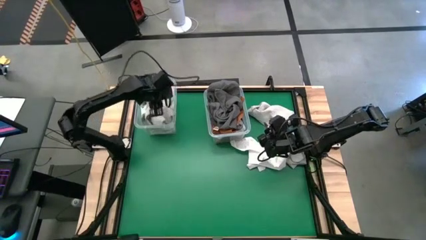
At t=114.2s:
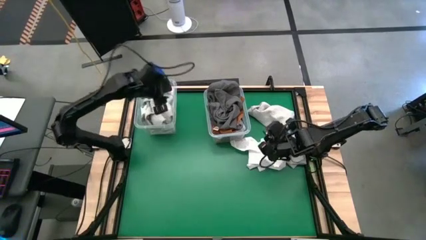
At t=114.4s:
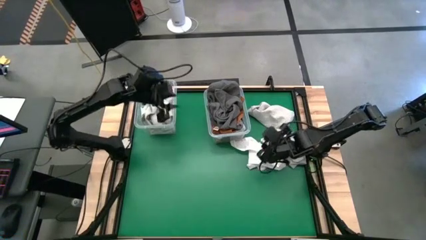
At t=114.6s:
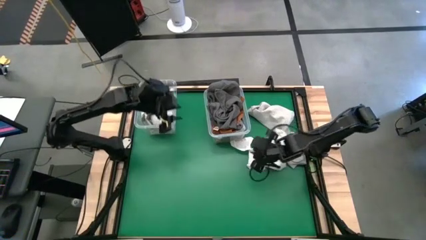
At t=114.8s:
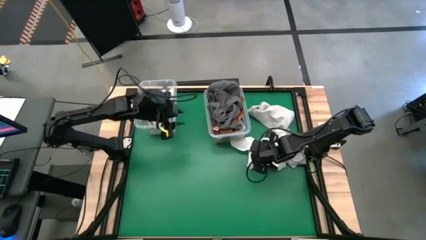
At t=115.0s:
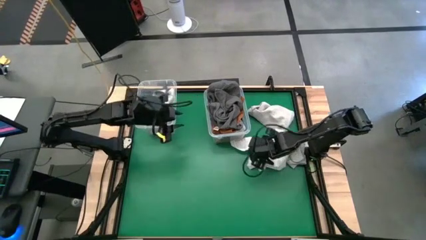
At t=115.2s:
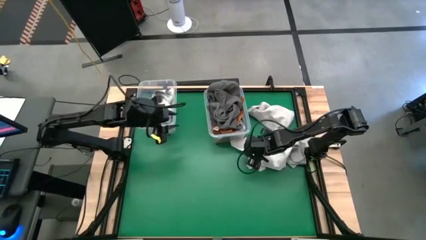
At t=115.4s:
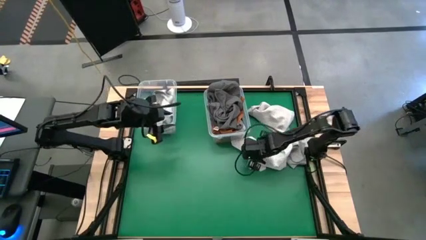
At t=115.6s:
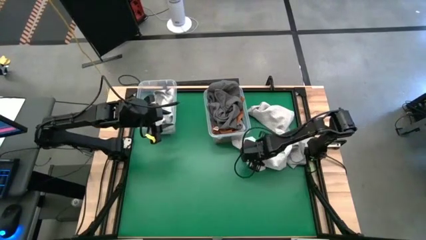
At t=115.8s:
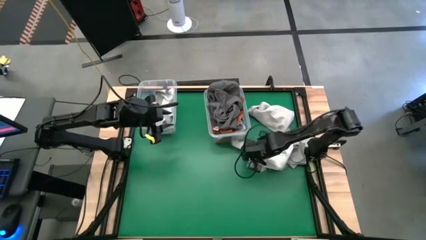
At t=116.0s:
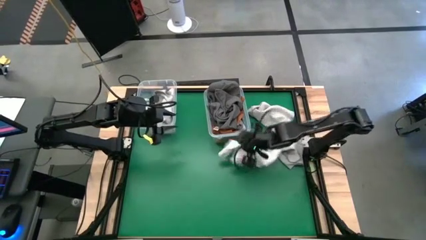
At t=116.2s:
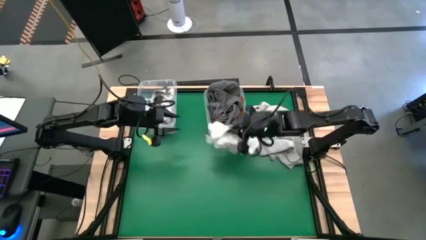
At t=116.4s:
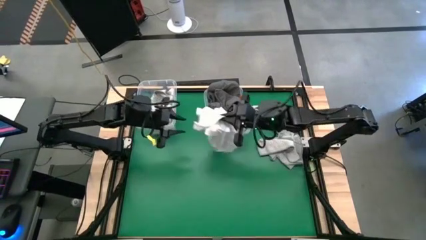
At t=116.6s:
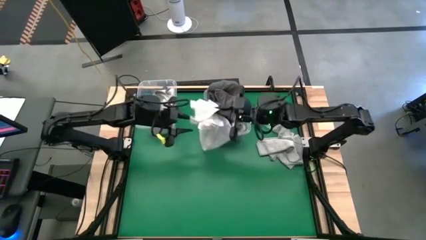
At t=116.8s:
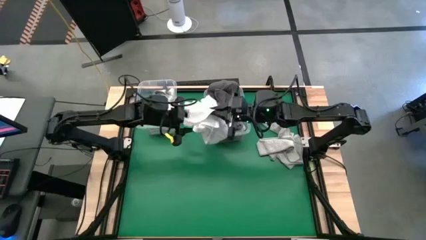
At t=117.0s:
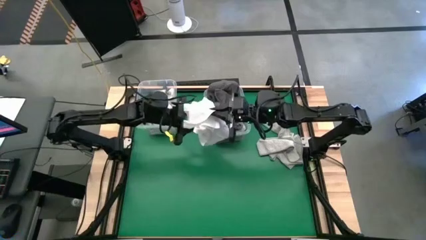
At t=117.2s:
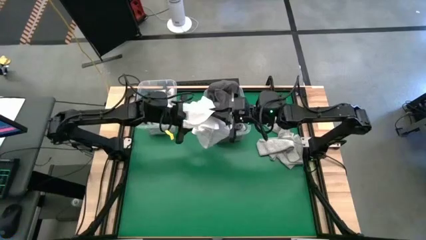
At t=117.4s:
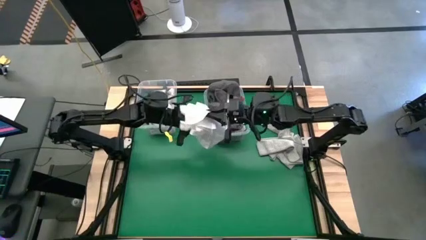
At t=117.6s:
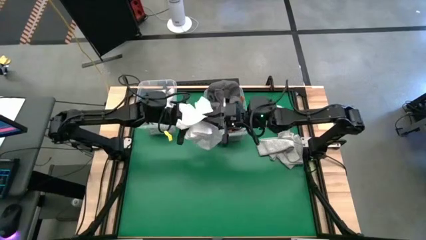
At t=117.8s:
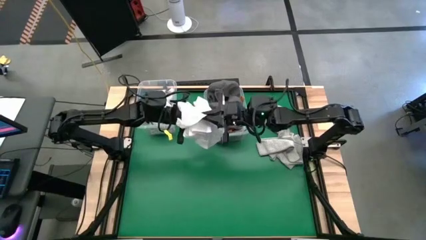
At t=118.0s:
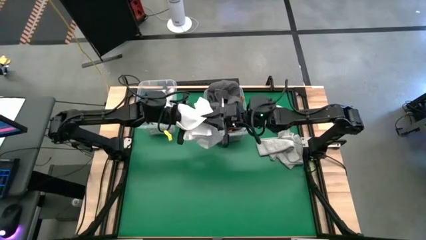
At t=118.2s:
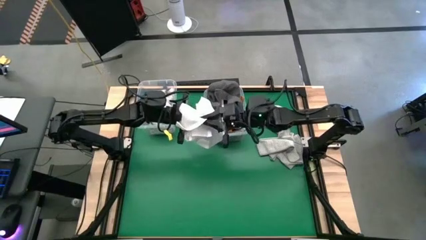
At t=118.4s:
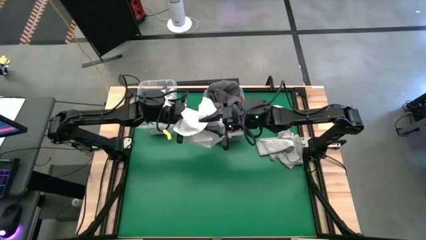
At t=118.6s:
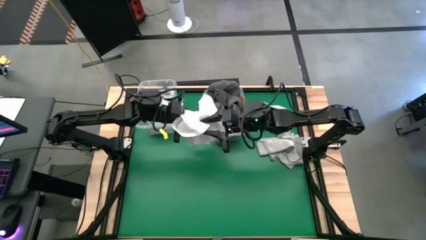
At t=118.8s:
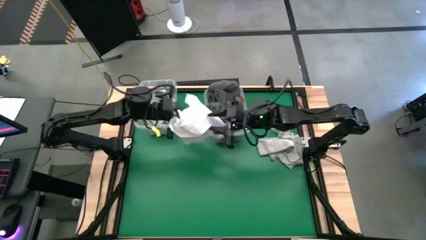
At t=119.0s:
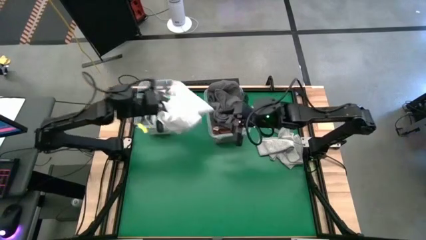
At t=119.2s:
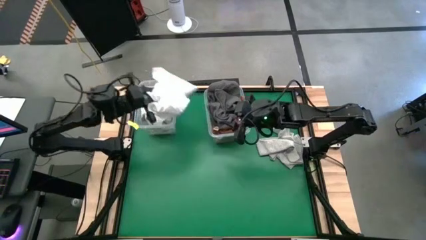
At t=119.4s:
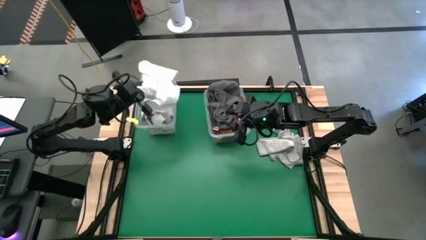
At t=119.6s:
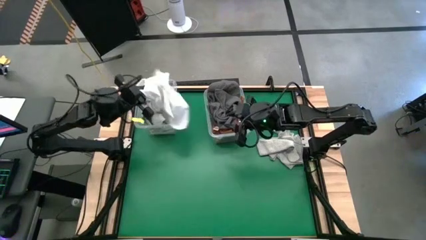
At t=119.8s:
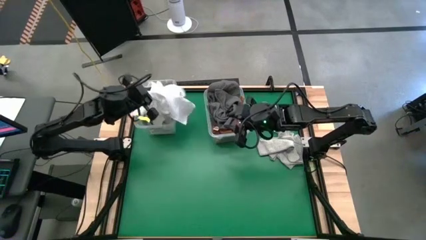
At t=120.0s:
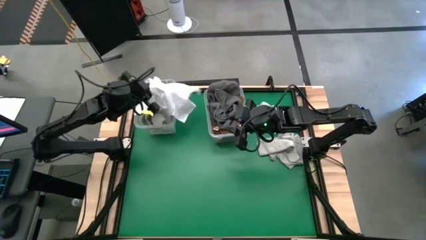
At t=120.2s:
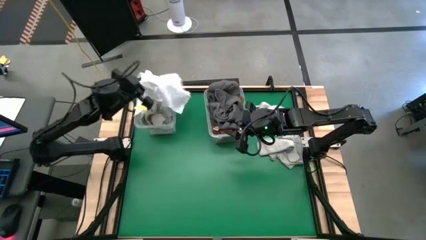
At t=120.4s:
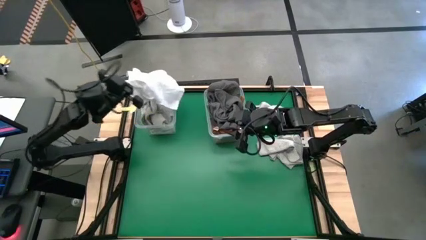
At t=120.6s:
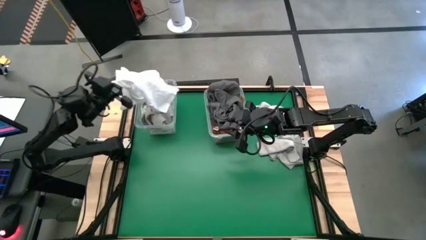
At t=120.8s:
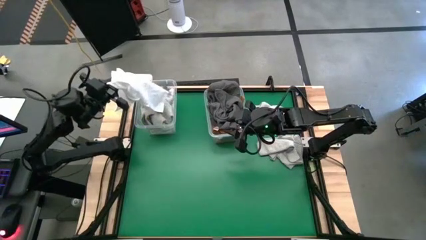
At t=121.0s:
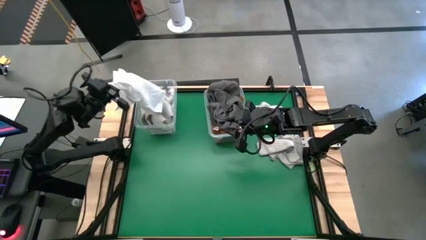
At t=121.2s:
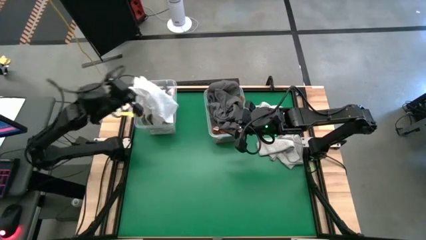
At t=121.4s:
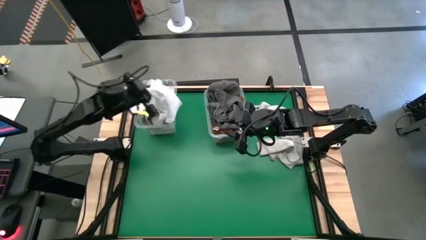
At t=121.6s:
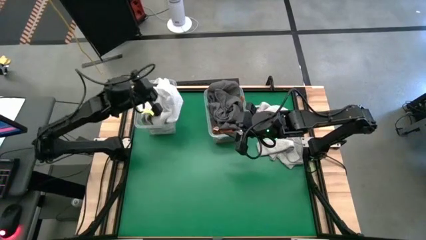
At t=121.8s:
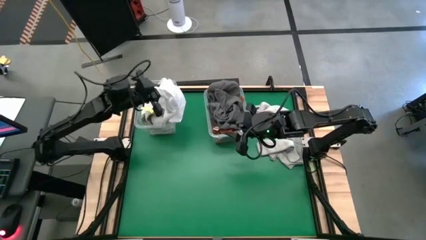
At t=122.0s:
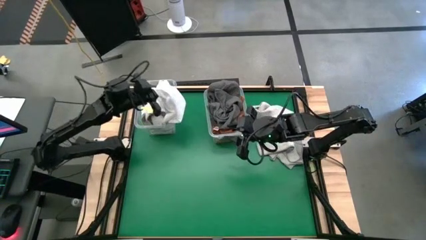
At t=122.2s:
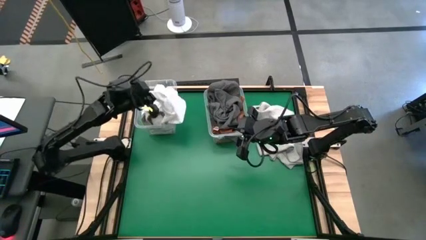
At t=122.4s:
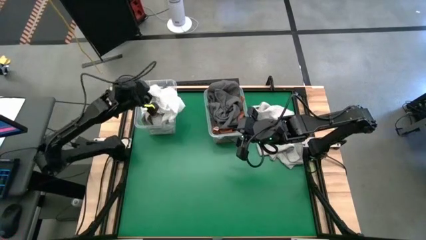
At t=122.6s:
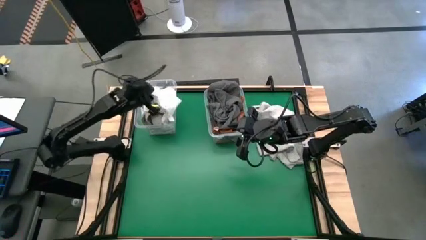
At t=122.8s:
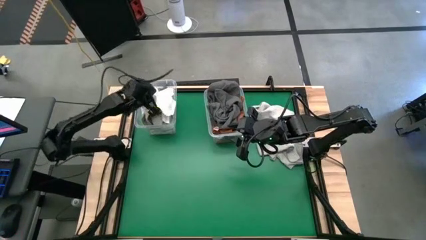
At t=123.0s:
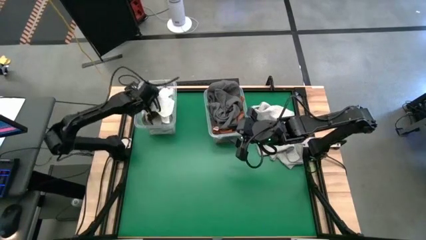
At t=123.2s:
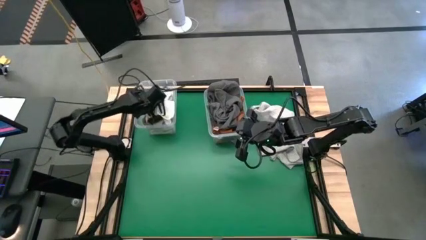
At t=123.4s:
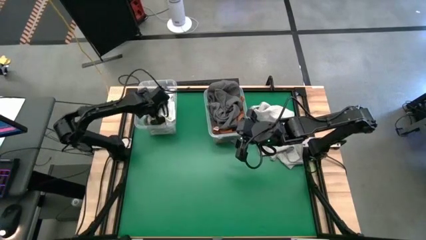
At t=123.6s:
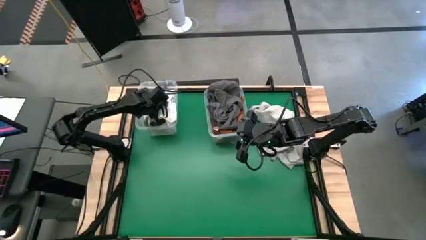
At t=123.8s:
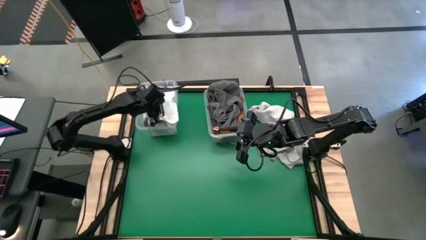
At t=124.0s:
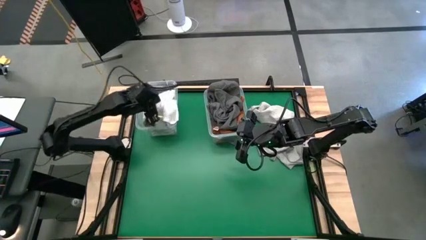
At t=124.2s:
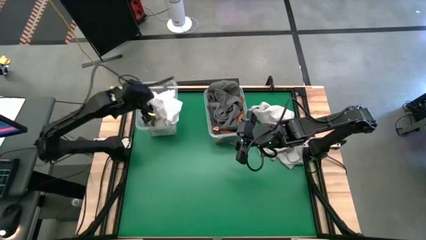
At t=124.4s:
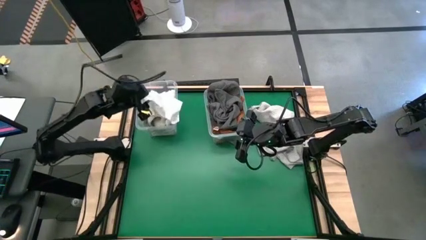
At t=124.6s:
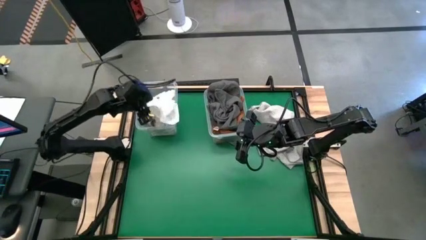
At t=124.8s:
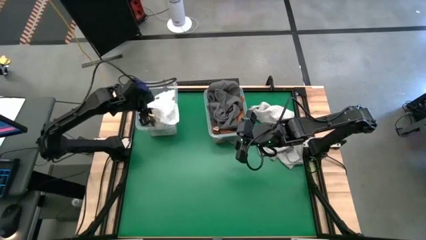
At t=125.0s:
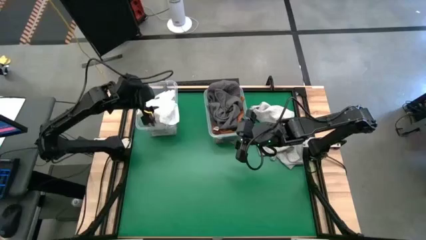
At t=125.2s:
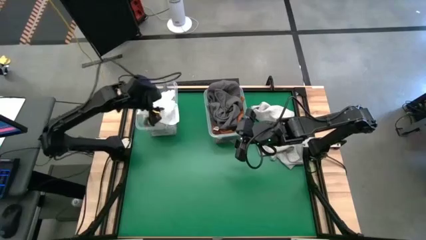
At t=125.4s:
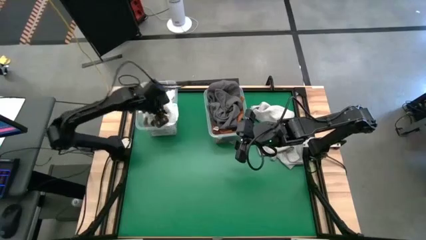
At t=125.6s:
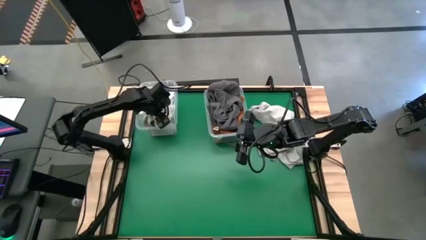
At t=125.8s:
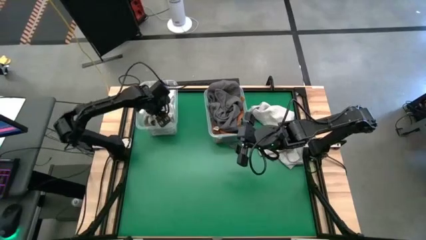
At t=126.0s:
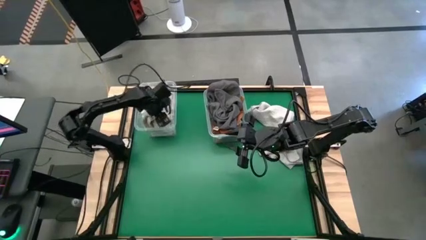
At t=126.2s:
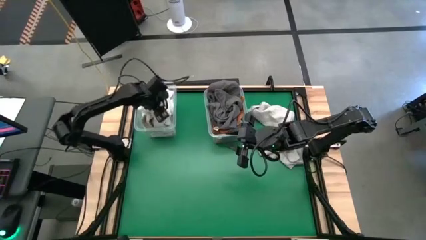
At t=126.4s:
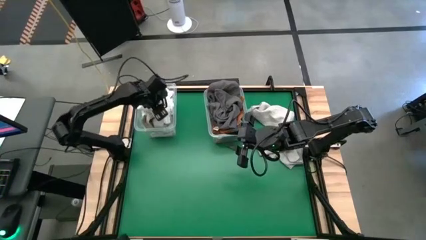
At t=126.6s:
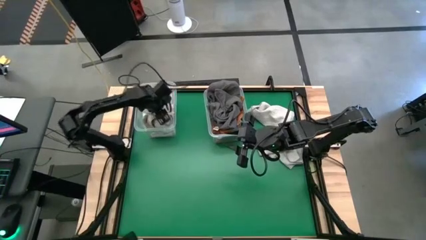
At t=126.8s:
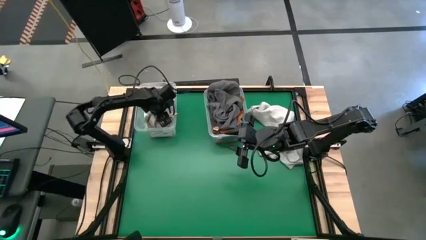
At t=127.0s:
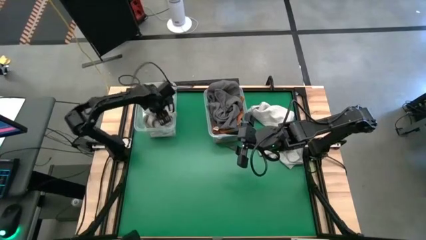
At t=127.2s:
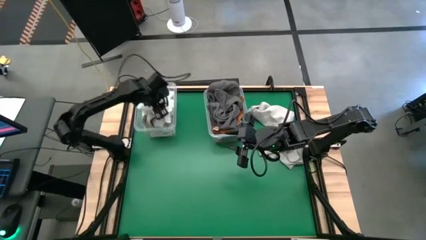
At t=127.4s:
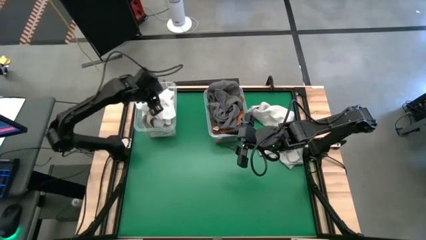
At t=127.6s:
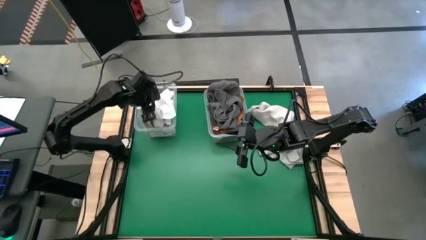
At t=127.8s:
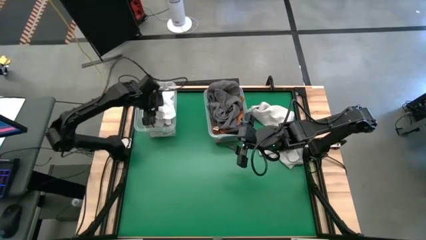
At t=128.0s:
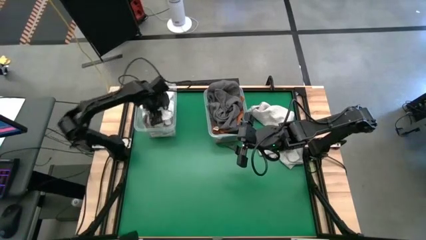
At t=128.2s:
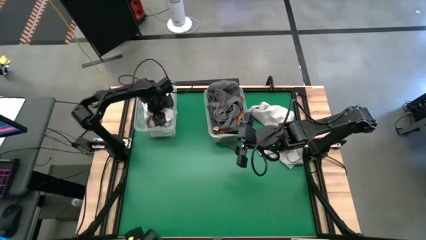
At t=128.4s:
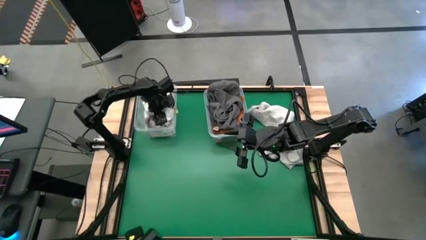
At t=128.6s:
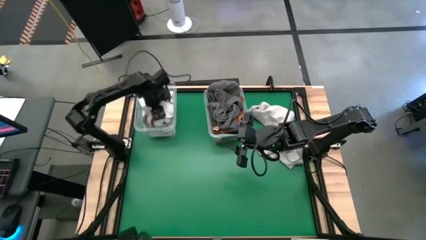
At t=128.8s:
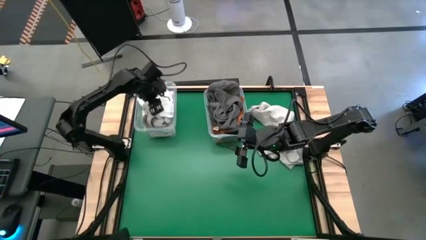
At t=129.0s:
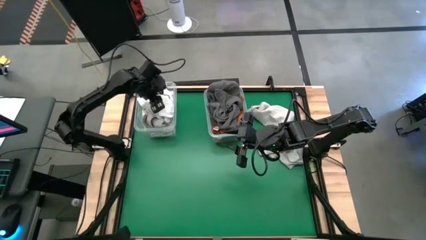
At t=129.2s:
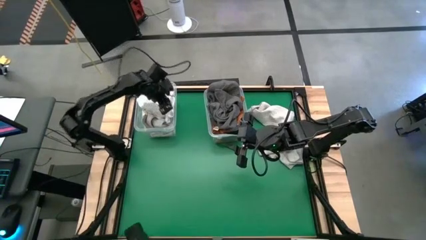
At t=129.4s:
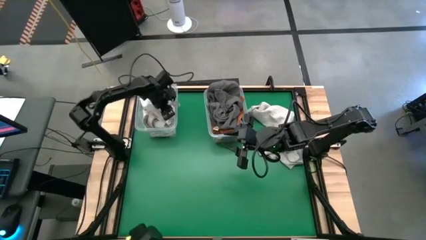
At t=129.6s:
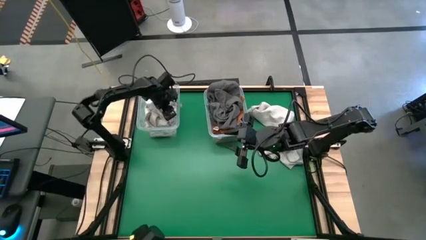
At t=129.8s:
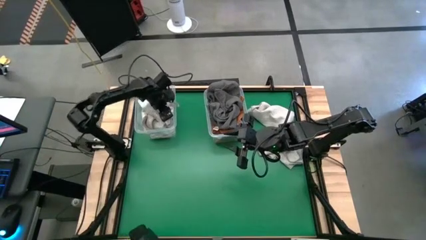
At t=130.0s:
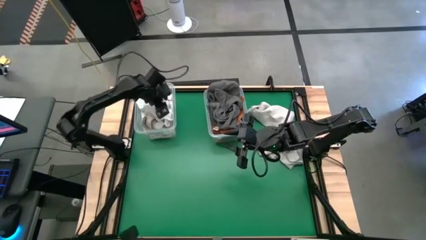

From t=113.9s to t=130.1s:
Task: Sort towels by color in basket
Put the white towel into the left transparent bin

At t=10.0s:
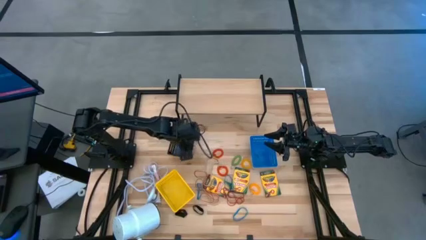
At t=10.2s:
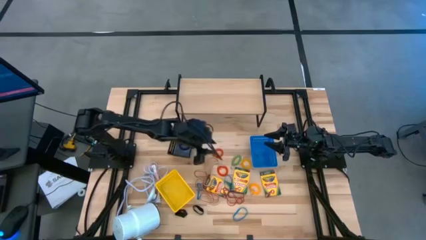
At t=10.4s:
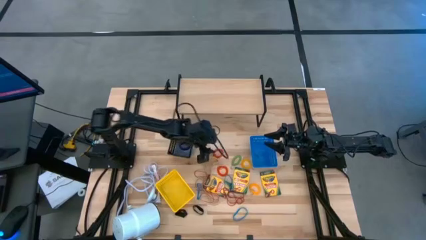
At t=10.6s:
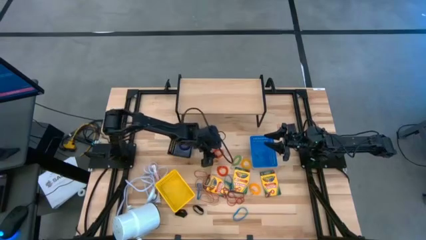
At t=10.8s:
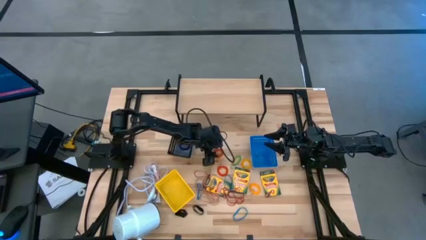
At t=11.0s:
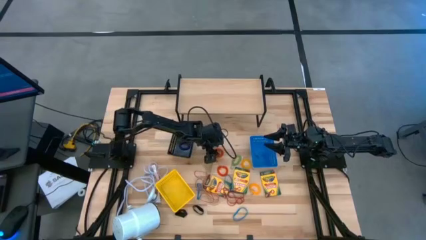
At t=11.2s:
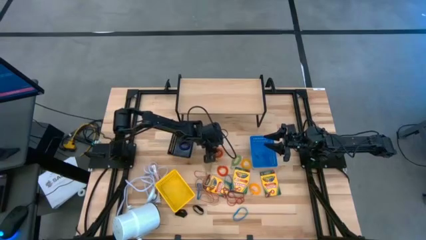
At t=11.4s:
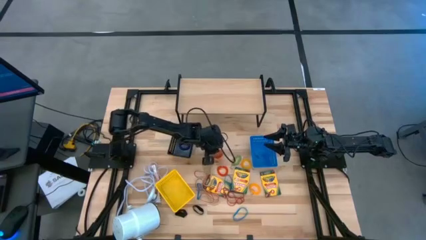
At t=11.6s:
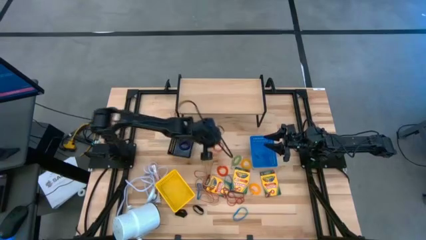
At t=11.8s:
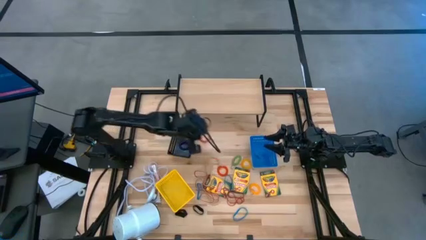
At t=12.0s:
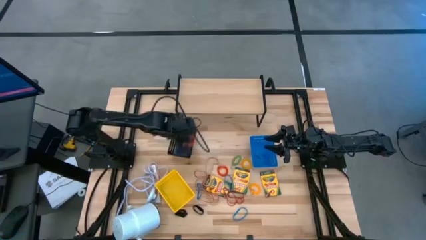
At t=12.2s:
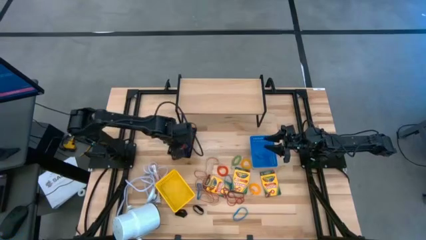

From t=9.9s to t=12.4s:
Task: Pick & Place Office Desk Supplies
Put the orange spring keychain into the black bin
